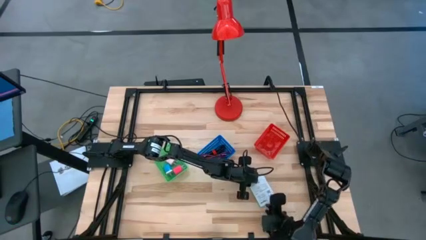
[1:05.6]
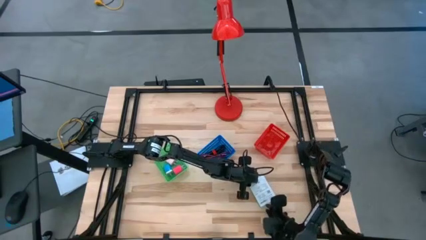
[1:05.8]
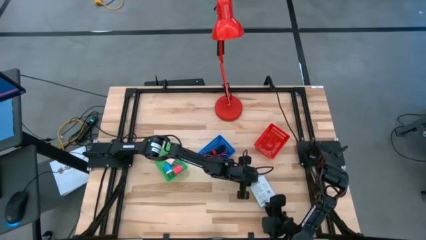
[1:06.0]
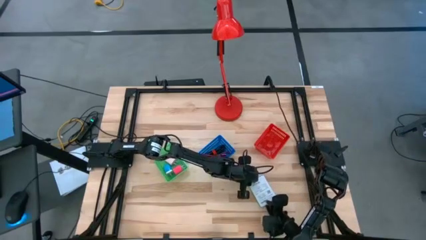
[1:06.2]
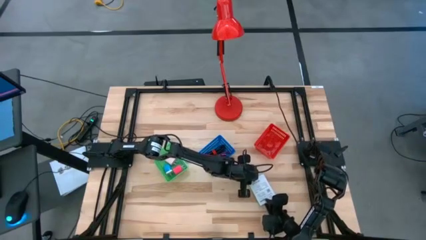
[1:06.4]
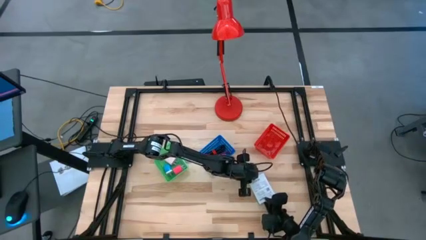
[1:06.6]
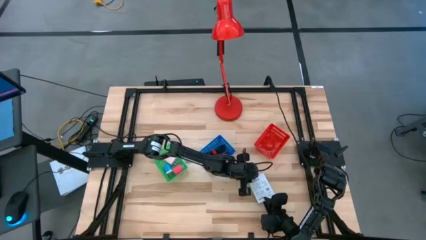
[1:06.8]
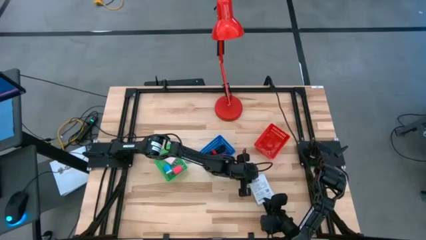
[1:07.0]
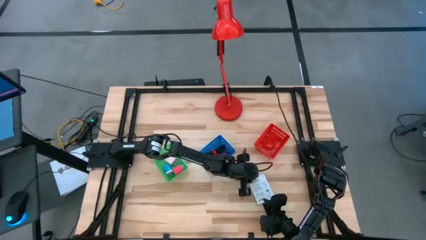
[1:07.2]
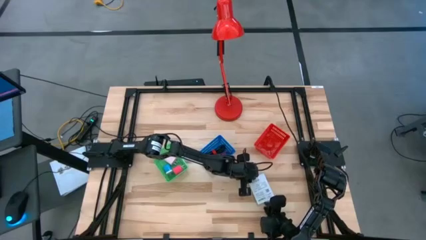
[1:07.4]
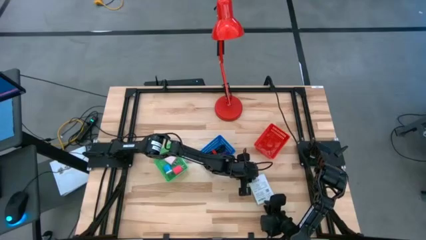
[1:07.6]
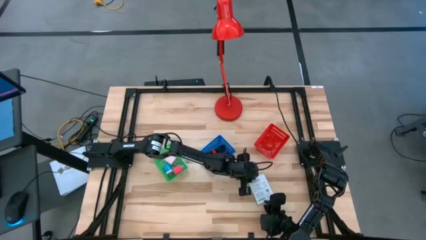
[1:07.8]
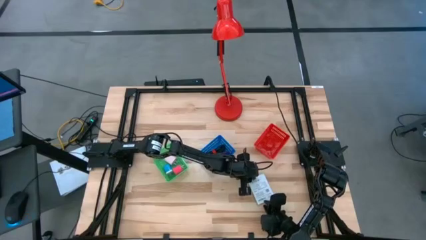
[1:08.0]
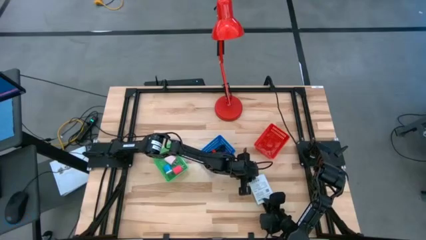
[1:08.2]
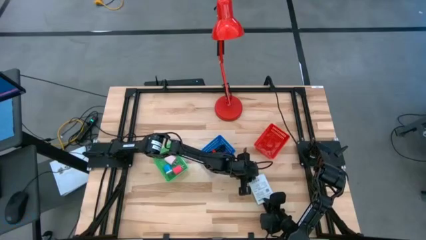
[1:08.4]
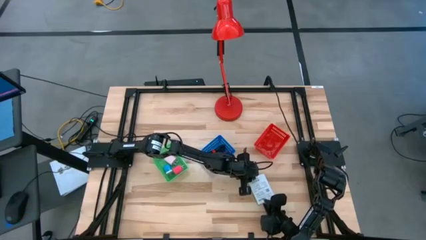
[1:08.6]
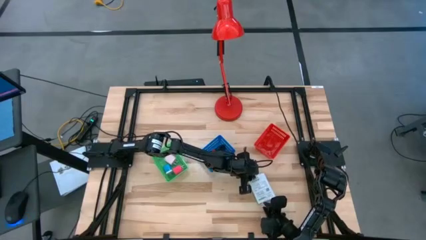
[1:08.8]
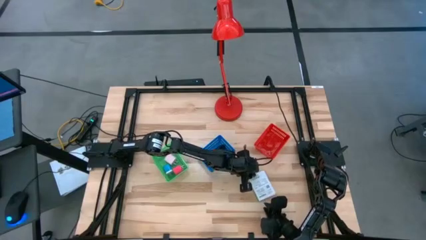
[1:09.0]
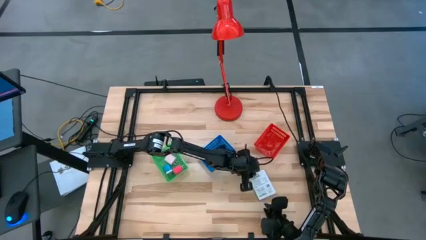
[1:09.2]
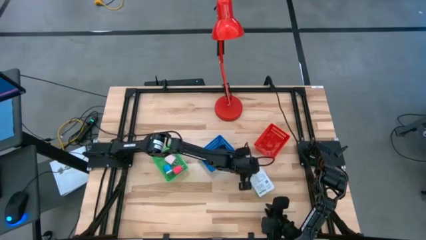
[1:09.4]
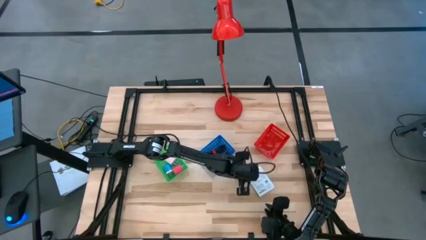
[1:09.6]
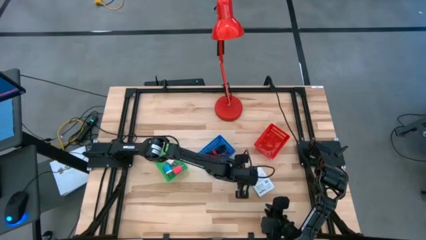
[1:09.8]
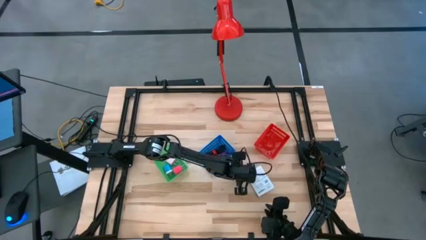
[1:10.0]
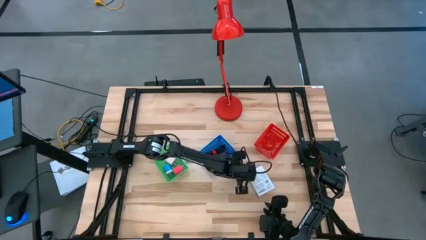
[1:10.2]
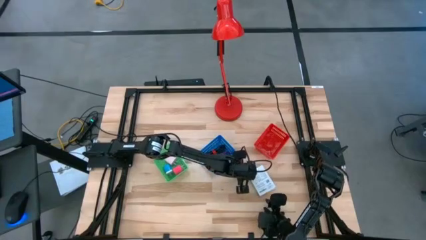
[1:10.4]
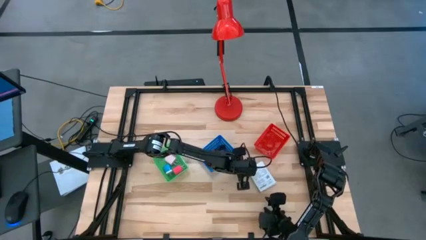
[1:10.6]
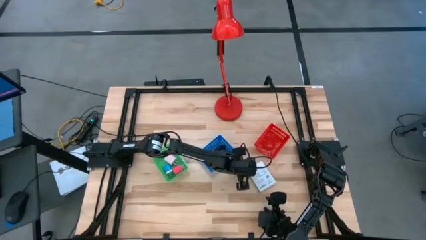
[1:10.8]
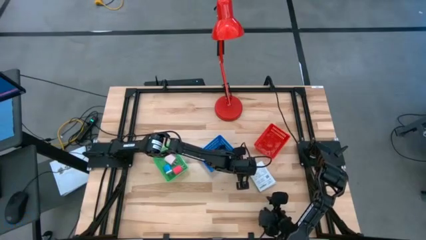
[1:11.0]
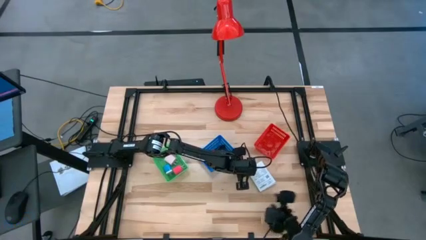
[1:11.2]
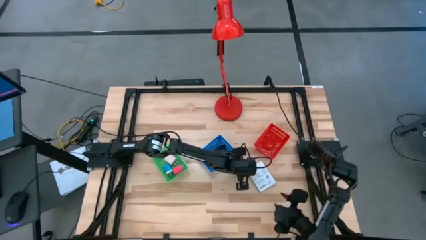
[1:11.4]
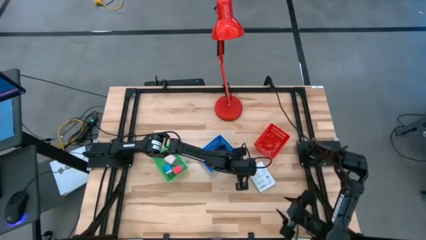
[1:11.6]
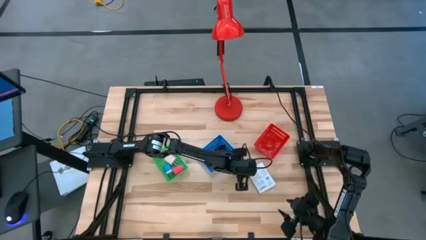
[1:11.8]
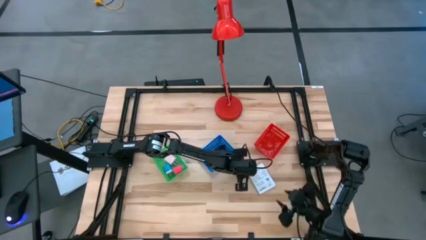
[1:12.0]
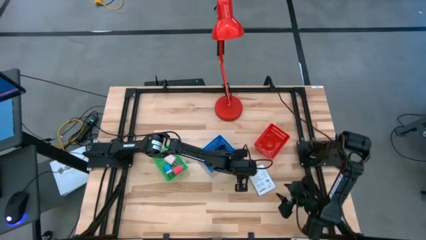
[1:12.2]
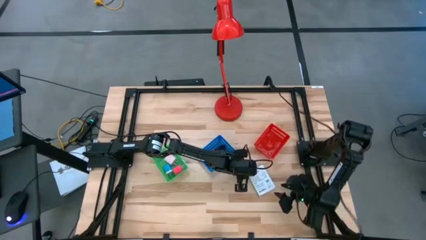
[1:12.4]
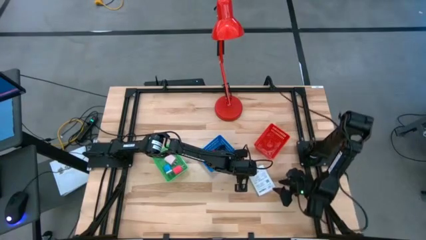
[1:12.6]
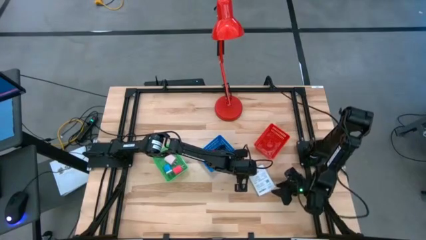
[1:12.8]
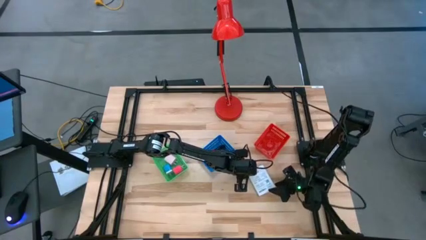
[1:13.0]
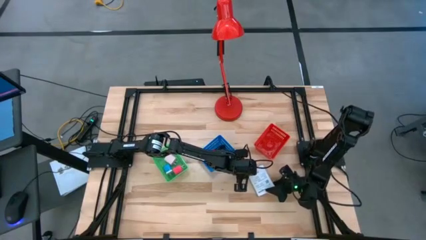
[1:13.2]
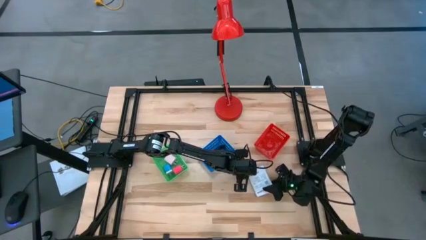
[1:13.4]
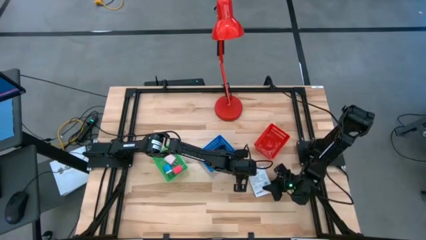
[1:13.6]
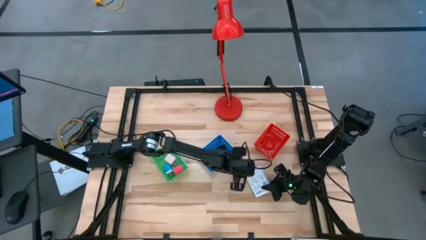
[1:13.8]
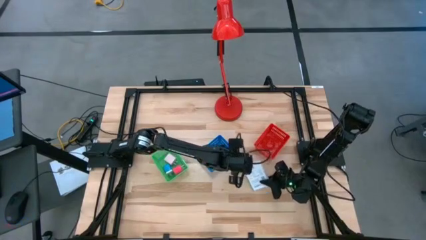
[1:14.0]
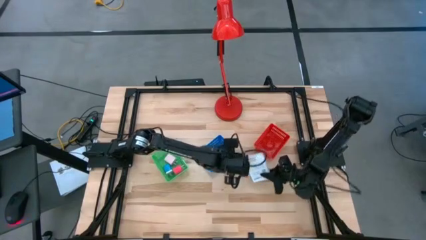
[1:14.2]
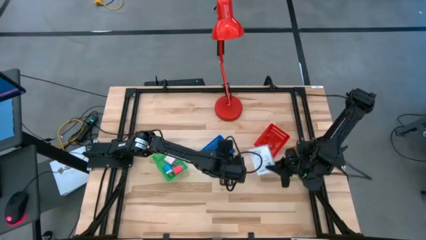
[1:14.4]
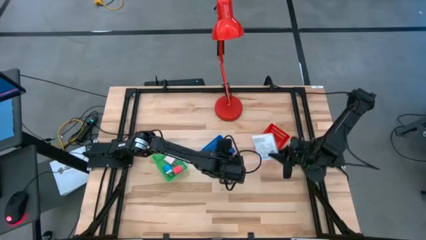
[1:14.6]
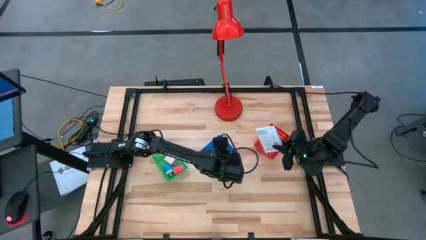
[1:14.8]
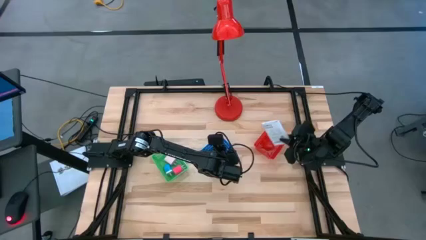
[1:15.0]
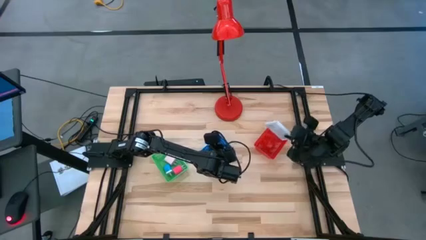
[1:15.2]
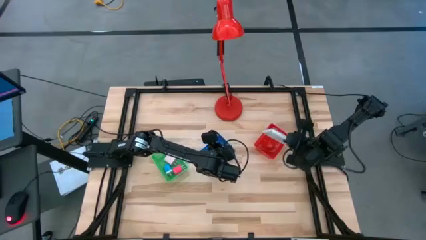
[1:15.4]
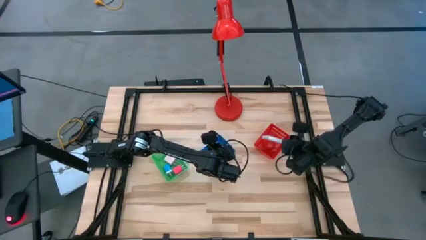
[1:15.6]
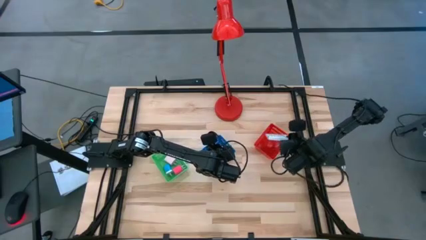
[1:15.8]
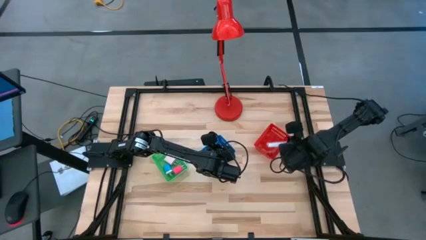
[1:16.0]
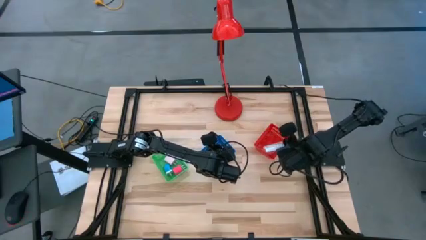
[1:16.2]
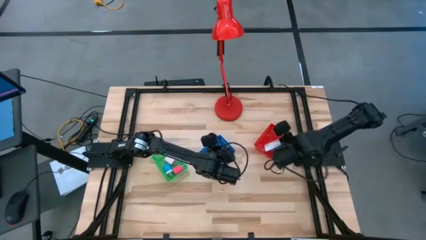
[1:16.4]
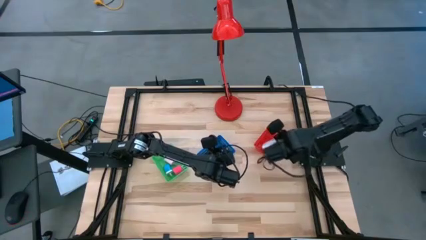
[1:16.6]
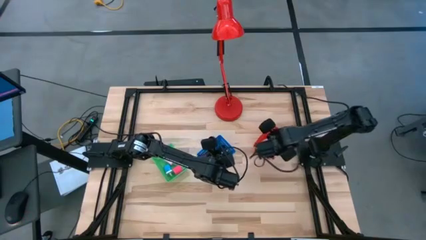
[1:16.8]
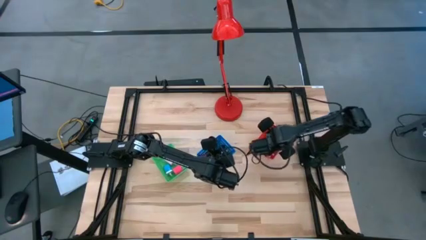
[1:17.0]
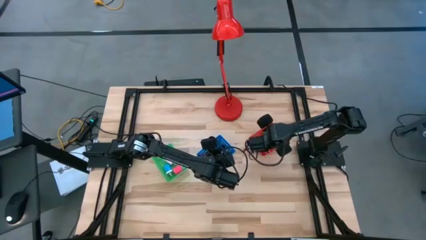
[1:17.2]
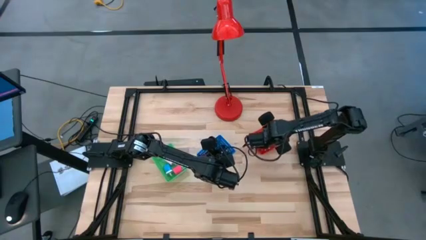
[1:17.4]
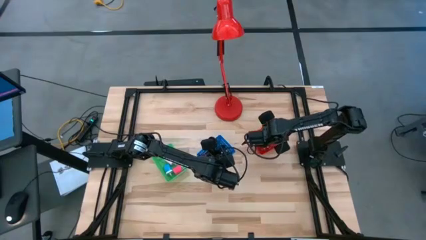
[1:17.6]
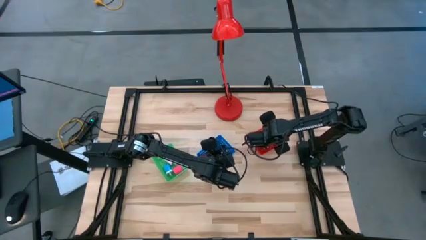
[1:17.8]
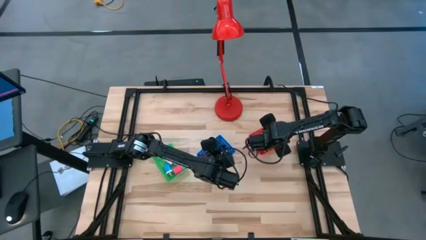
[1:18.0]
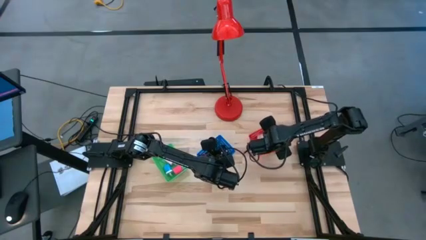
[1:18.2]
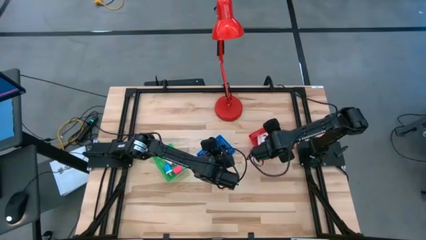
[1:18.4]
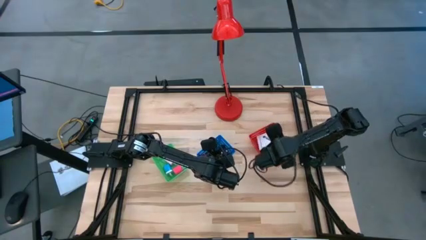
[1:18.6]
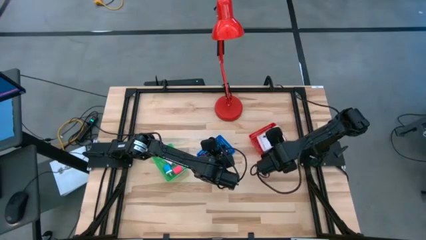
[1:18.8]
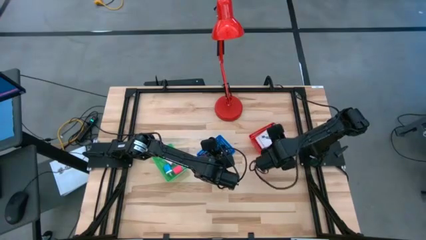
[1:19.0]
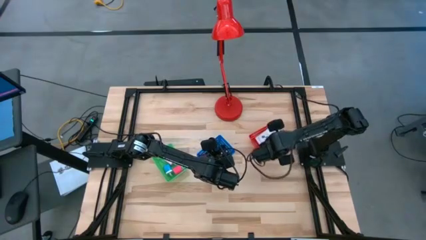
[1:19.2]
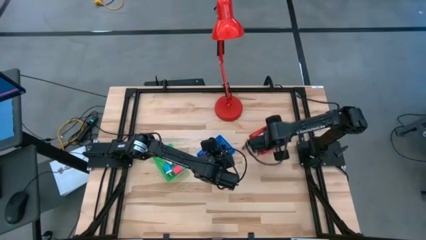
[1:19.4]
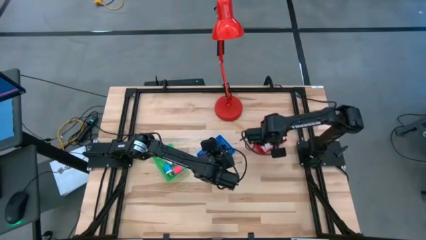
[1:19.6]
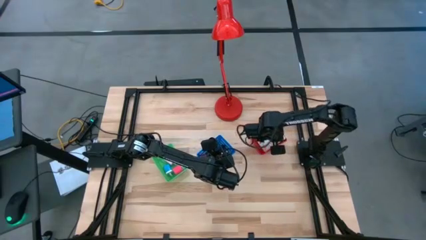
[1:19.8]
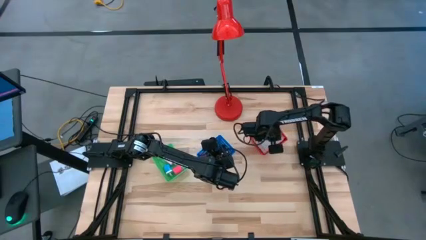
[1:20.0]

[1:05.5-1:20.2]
Task: Pick and place items into bin
Put the card reader box into the red basket
